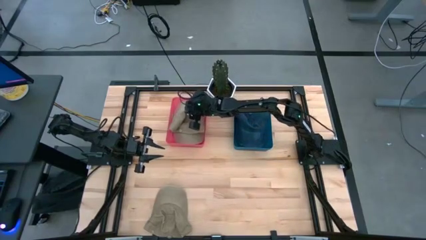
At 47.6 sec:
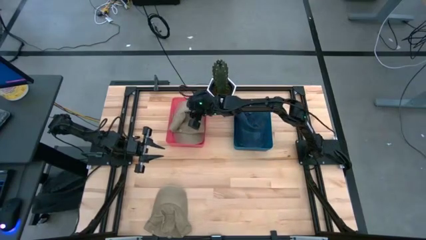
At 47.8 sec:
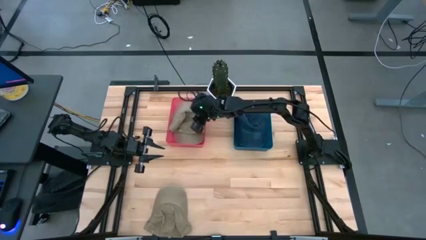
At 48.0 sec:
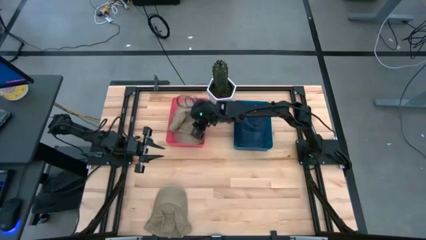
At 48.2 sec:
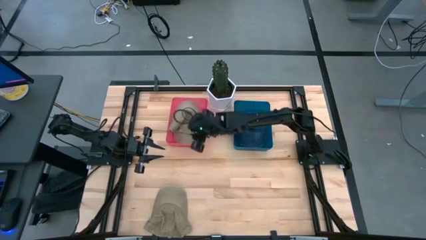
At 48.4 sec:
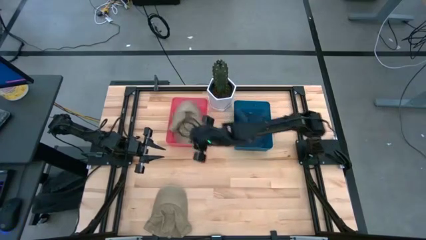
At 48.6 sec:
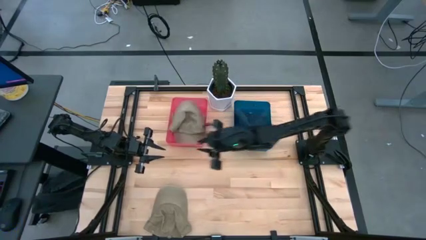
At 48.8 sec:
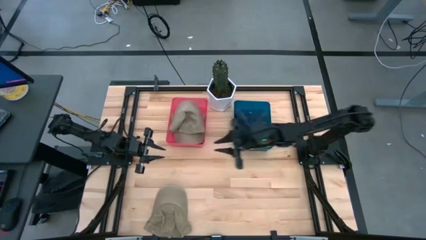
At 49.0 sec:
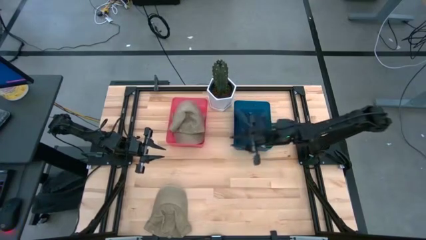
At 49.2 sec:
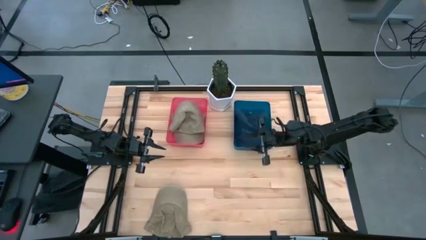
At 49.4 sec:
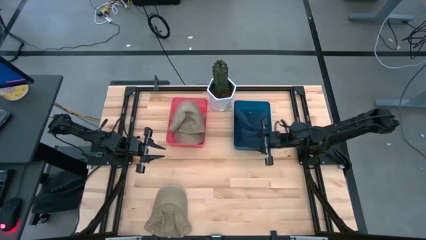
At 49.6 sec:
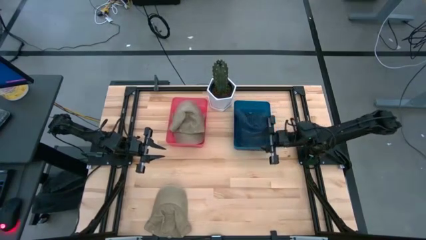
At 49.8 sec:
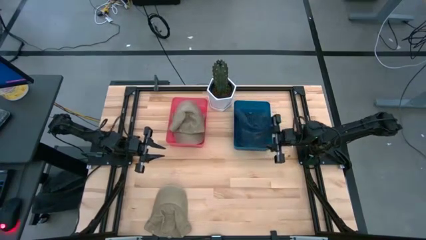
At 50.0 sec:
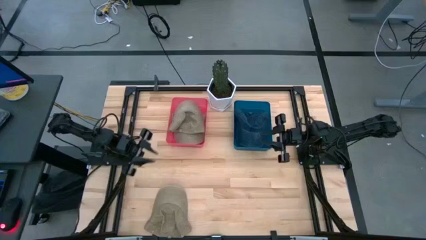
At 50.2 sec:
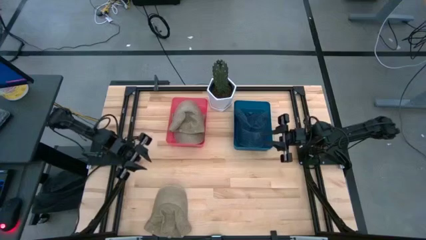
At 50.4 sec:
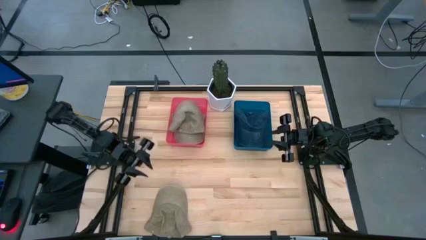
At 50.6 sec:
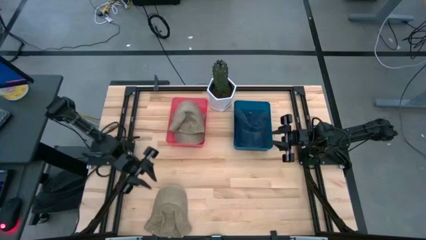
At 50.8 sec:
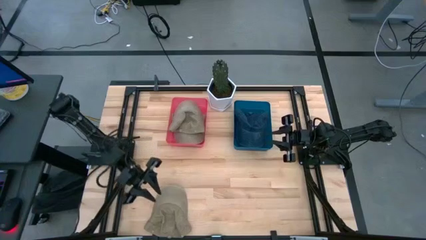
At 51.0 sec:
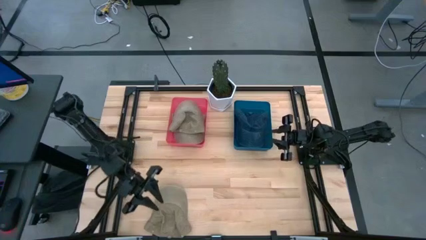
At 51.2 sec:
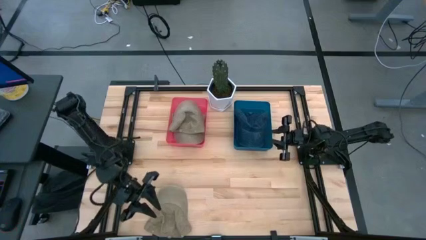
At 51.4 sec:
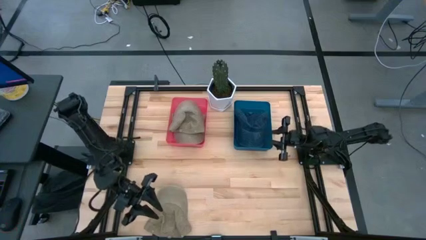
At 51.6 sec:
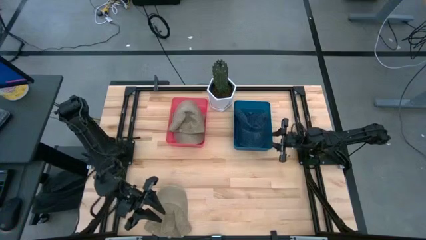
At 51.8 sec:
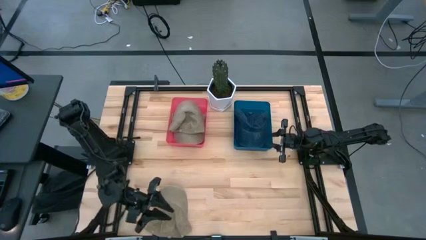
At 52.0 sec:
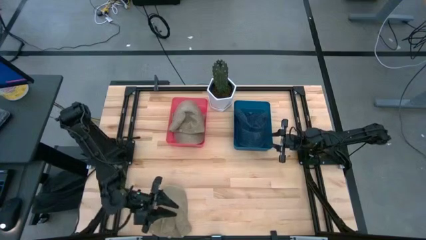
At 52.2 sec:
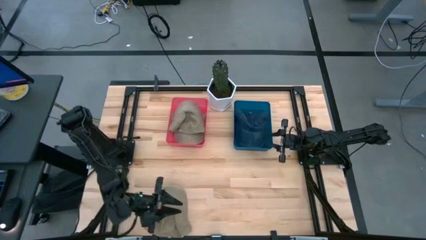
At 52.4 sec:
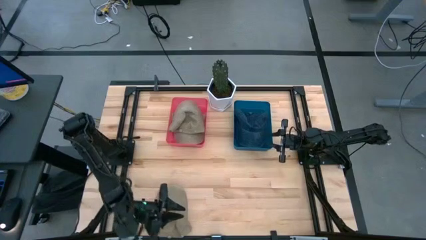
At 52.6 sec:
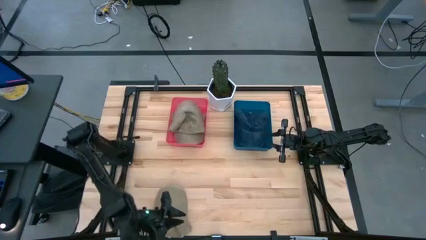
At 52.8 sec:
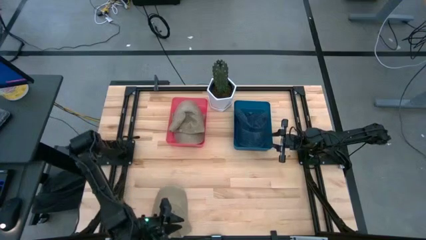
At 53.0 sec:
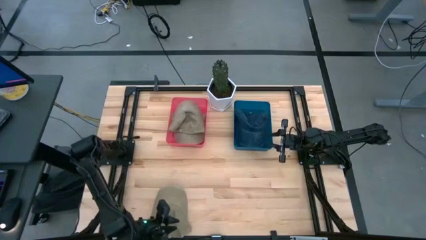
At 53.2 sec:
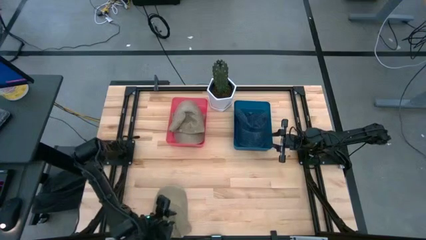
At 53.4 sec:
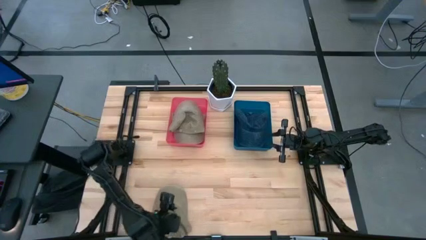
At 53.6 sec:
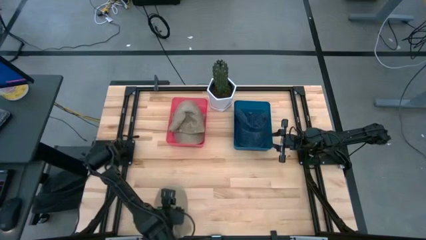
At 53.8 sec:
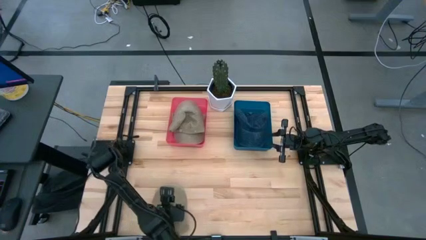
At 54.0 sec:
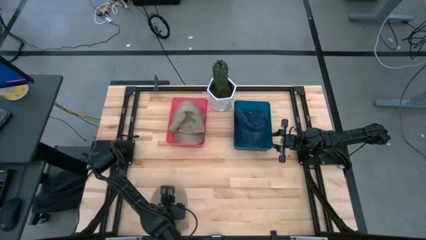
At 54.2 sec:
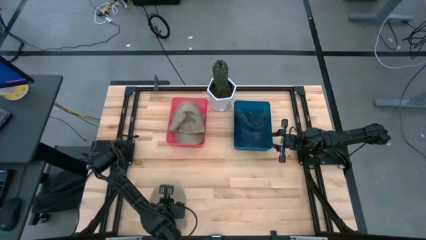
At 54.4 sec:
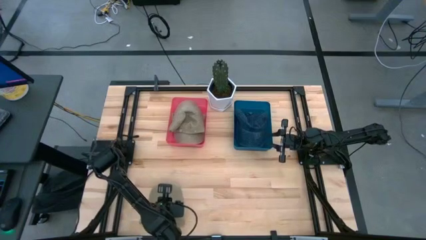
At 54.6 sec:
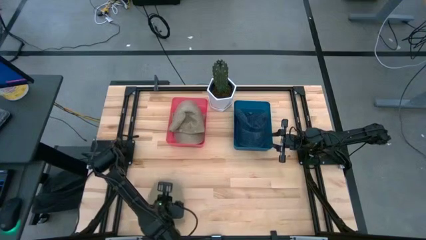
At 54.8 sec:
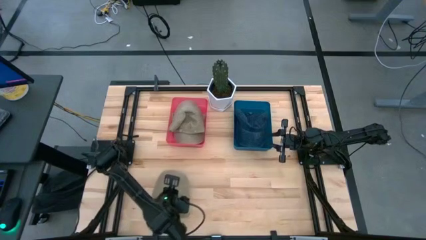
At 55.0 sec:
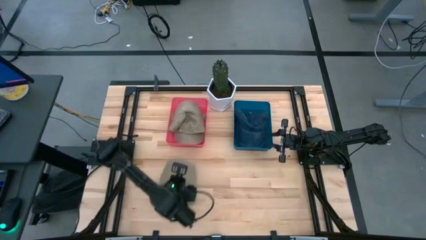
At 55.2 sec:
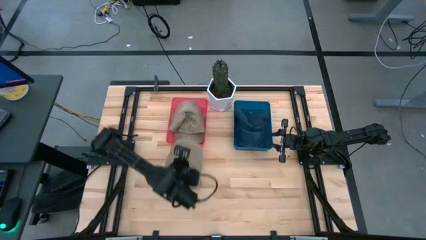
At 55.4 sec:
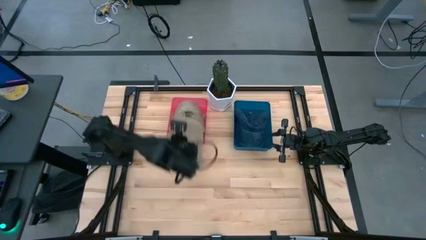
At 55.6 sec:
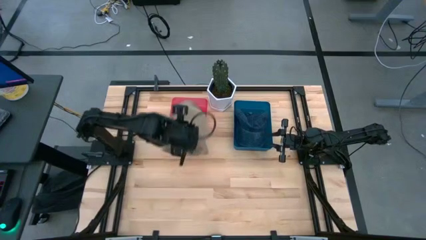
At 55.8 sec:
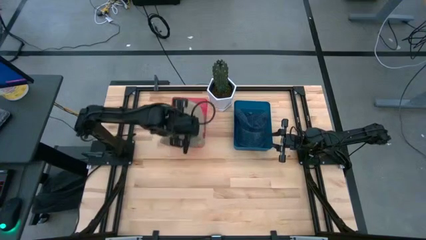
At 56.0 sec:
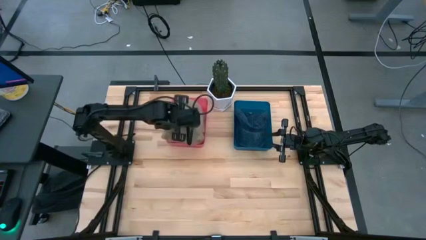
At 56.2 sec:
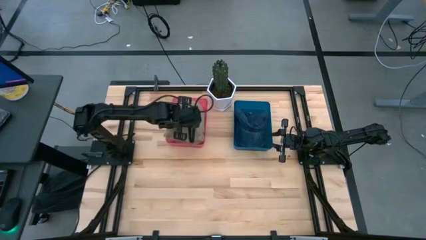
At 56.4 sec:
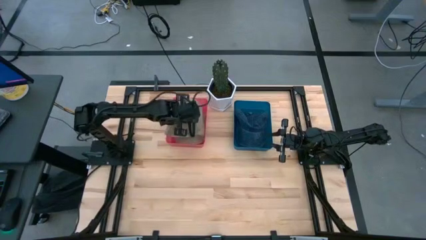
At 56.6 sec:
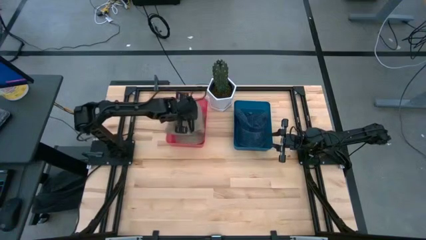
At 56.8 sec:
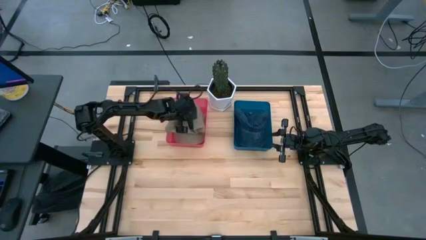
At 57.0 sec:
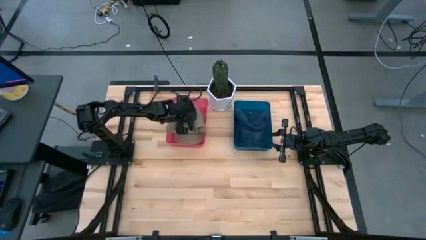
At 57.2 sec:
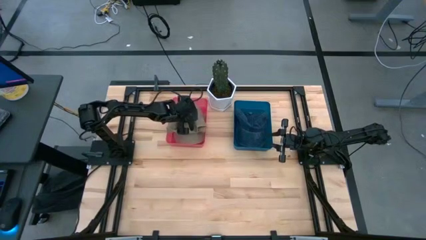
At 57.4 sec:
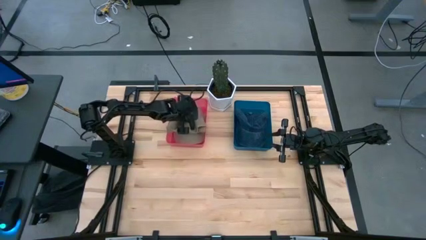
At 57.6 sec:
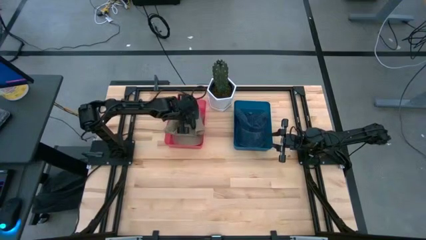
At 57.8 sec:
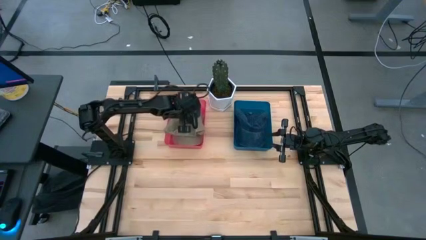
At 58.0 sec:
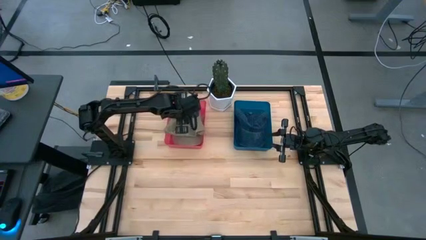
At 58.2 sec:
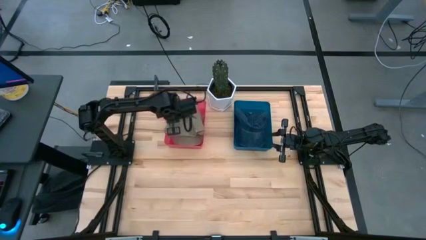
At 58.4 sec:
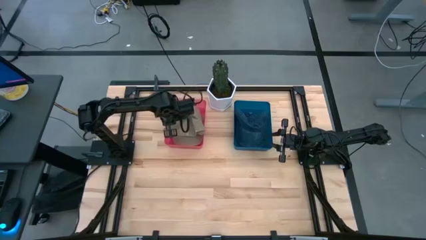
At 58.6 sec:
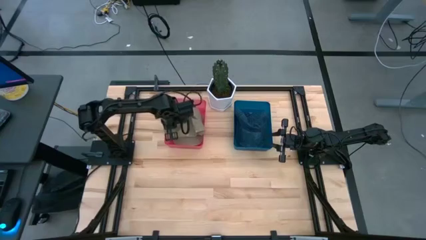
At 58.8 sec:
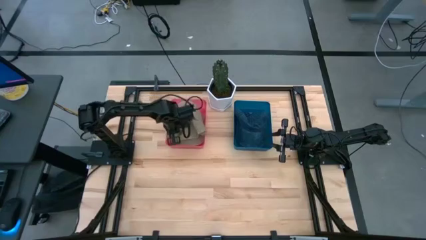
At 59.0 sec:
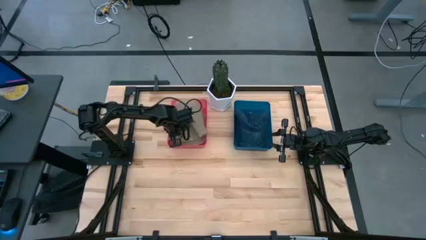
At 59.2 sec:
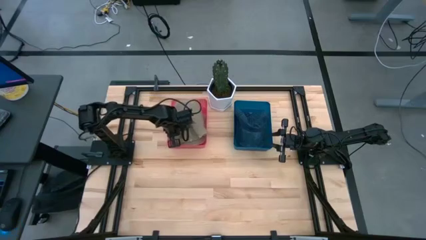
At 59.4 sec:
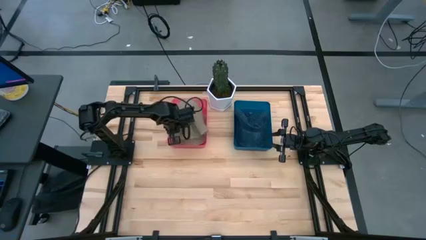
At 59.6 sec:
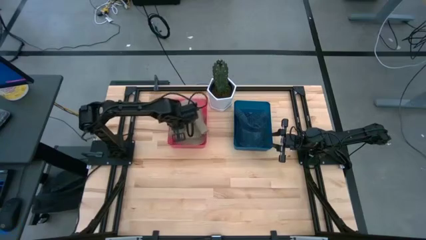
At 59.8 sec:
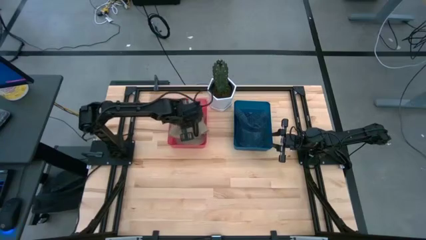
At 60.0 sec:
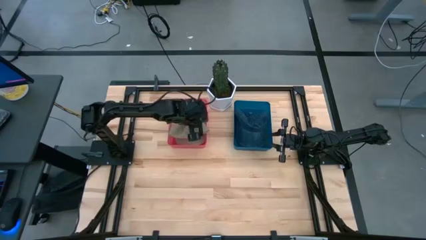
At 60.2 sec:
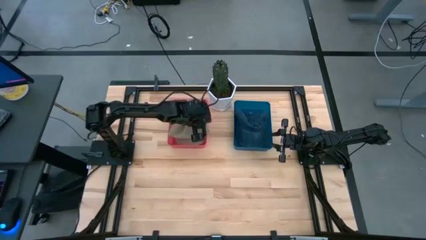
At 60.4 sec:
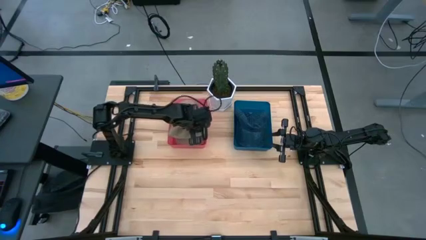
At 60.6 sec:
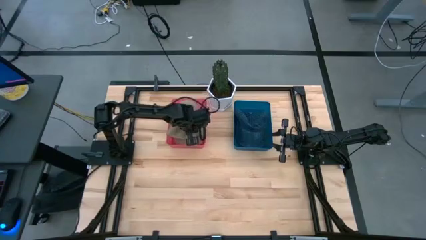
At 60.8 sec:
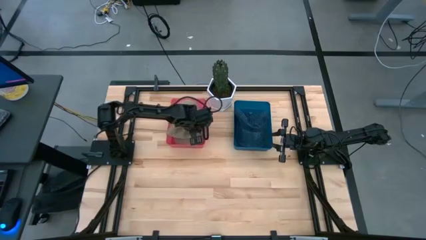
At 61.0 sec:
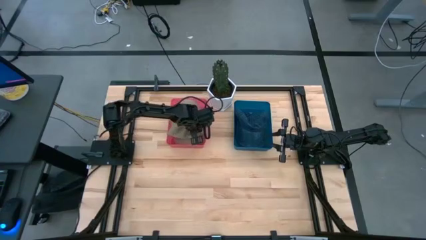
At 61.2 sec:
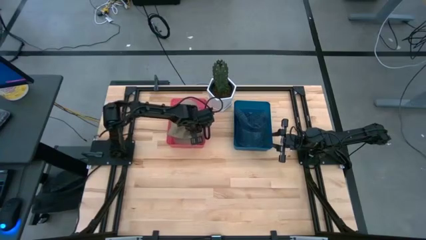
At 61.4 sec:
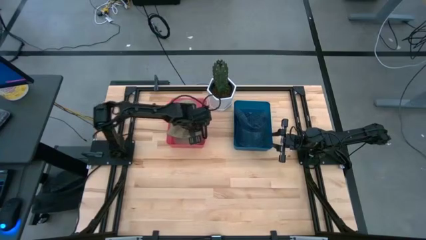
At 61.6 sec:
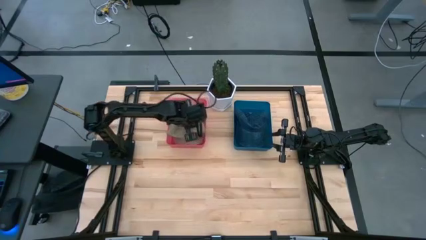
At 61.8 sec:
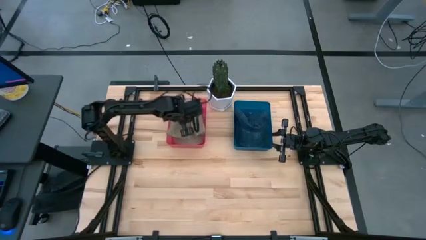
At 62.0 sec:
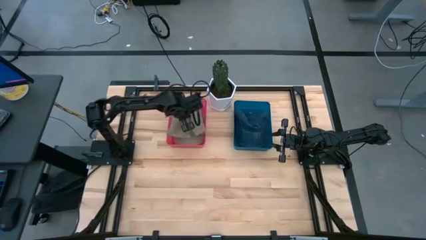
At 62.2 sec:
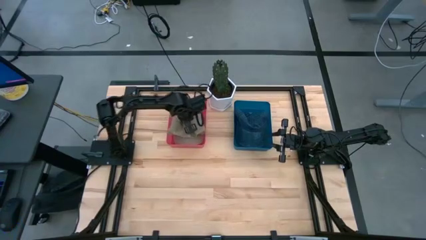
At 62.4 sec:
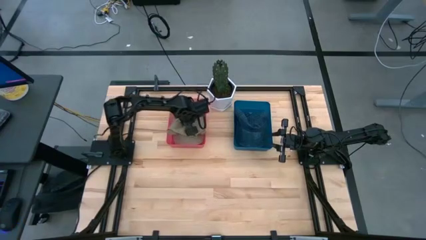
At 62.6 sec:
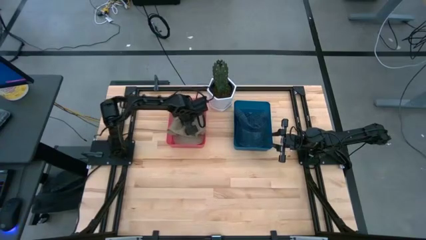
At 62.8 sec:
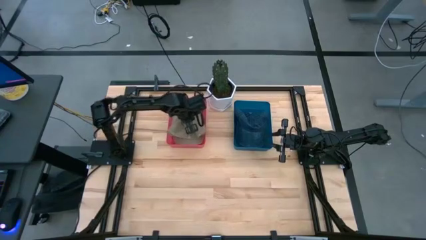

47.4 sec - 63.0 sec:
Task: Pick & Place hat
Put the brown cap into the red bin
